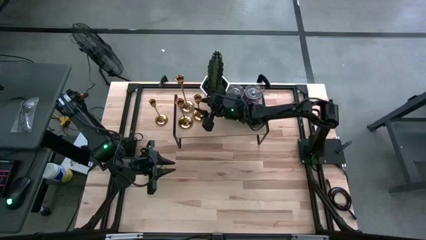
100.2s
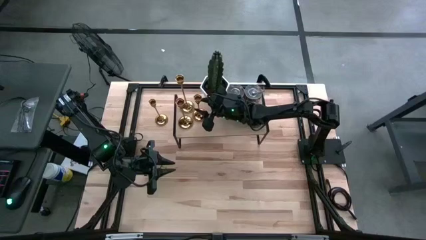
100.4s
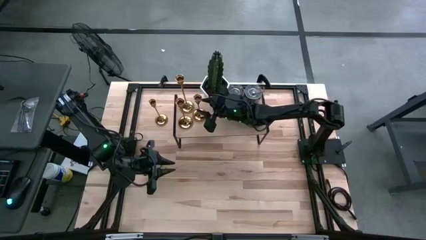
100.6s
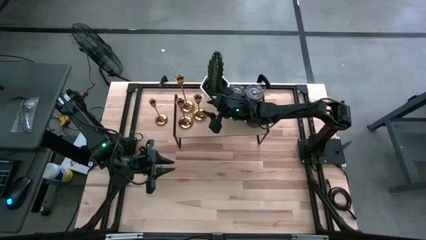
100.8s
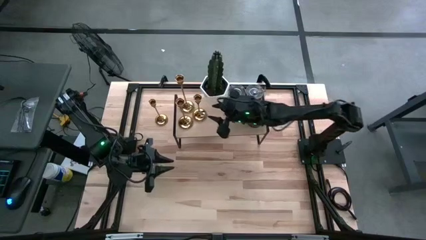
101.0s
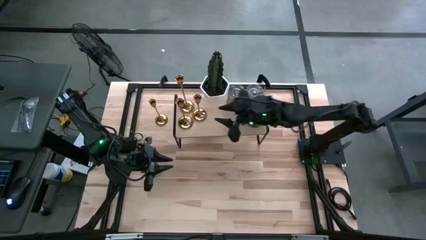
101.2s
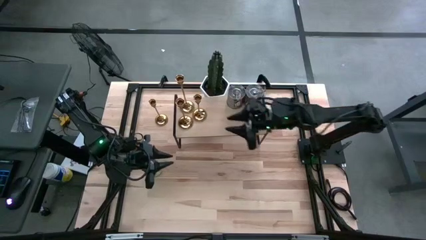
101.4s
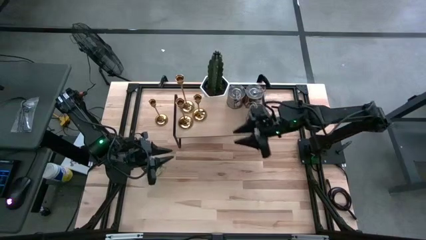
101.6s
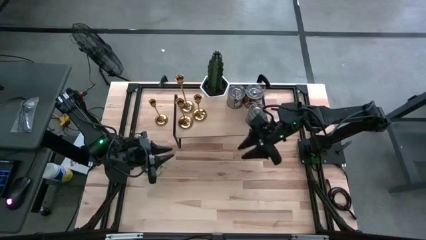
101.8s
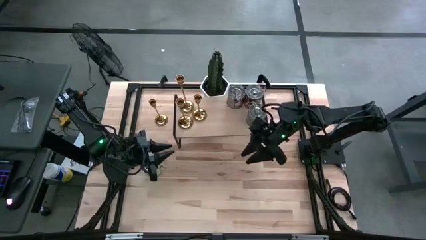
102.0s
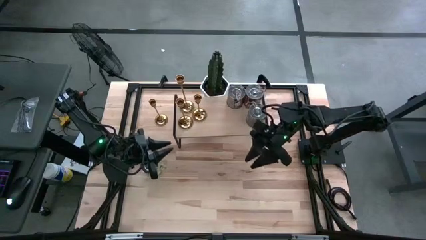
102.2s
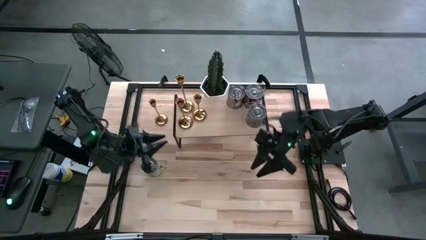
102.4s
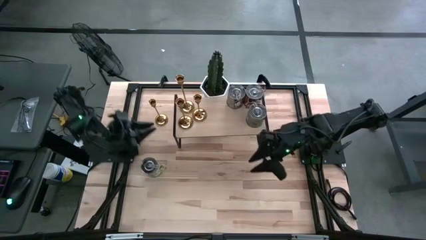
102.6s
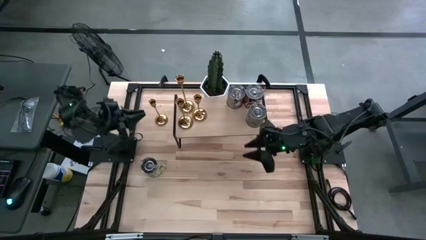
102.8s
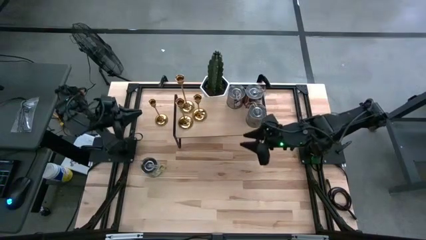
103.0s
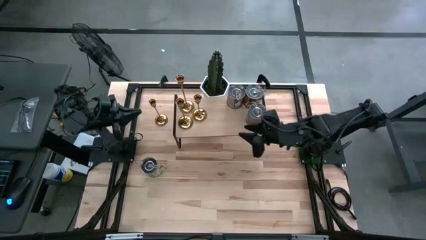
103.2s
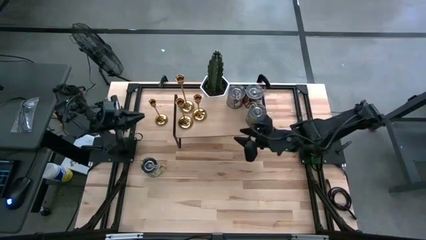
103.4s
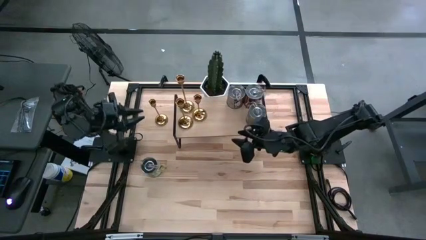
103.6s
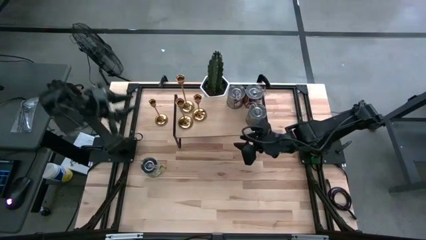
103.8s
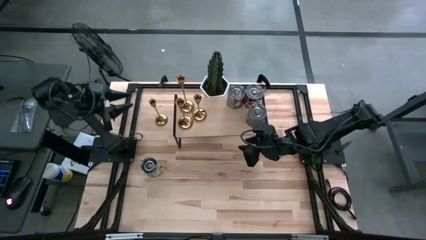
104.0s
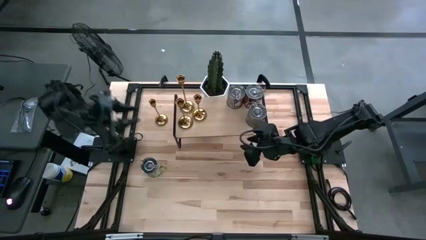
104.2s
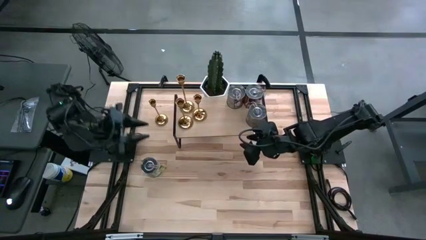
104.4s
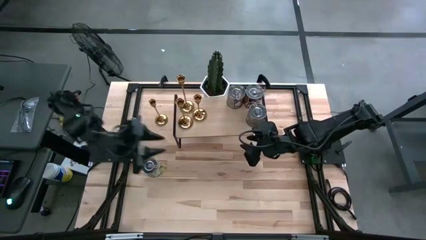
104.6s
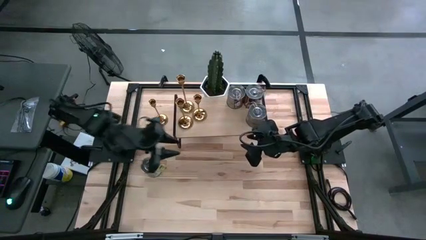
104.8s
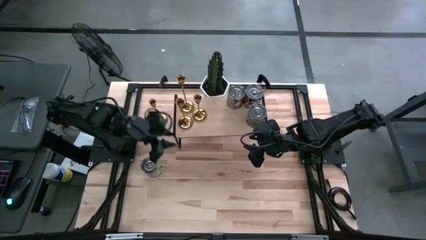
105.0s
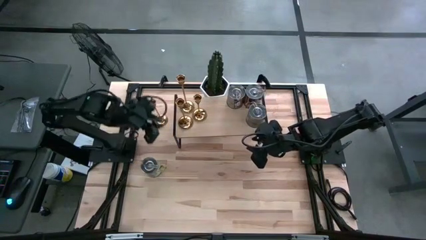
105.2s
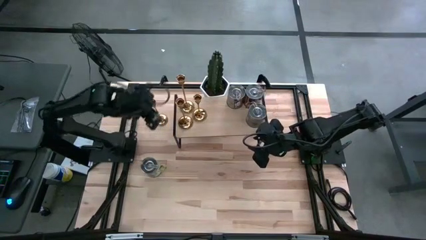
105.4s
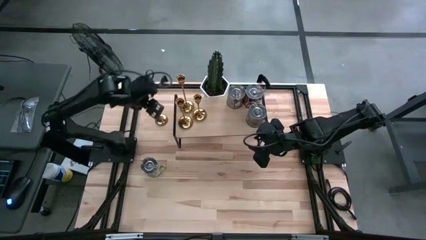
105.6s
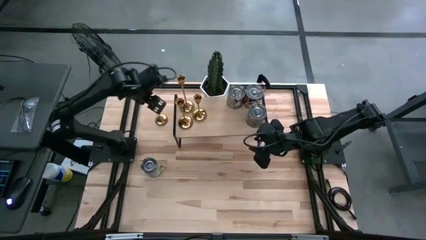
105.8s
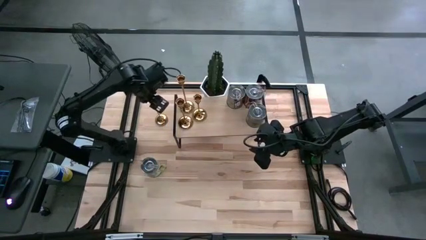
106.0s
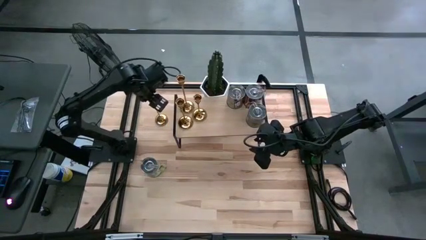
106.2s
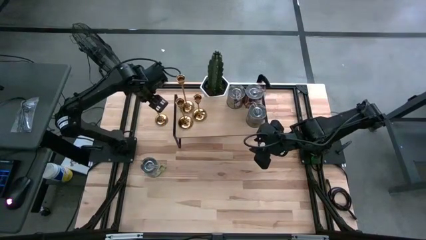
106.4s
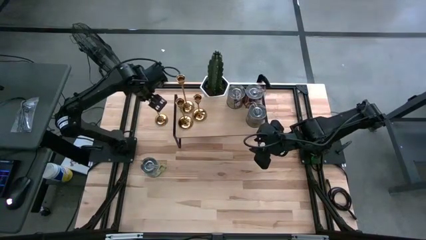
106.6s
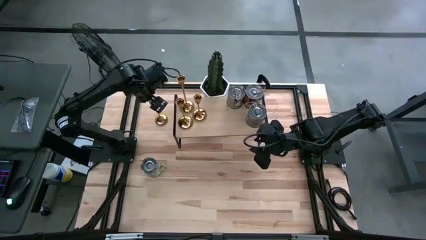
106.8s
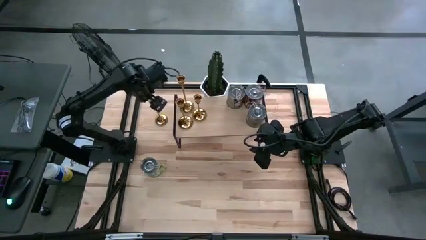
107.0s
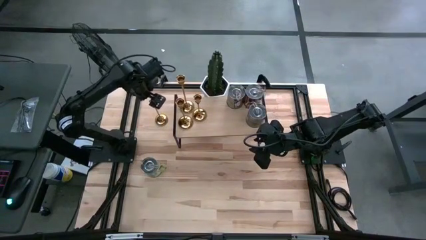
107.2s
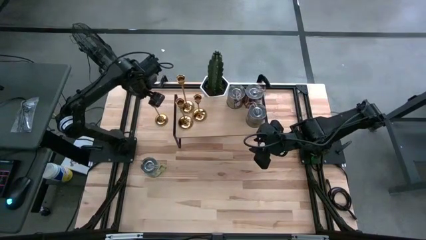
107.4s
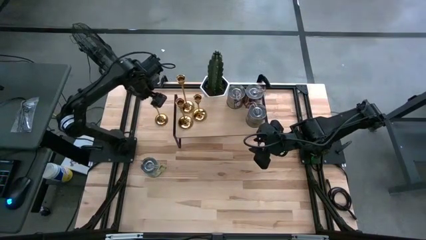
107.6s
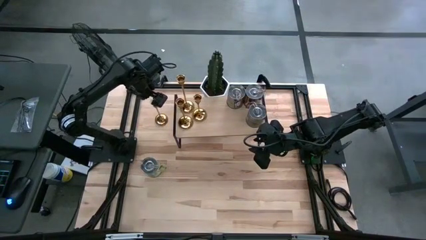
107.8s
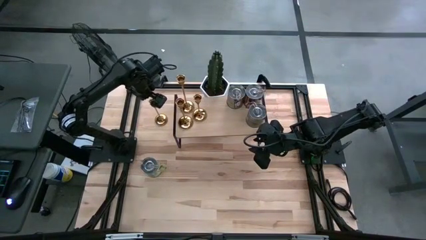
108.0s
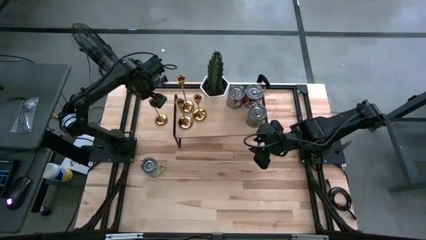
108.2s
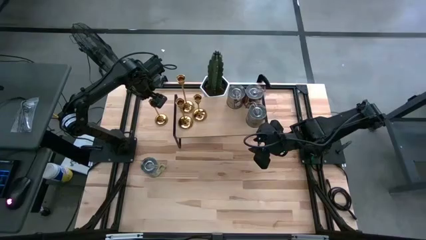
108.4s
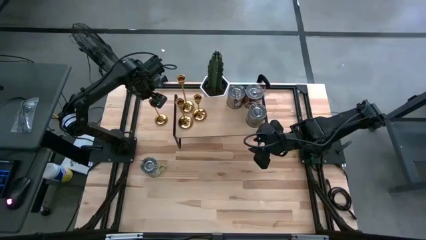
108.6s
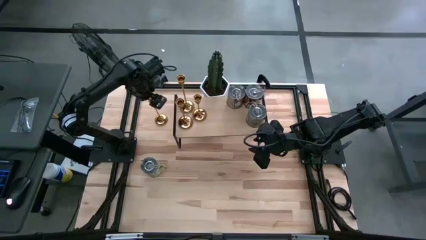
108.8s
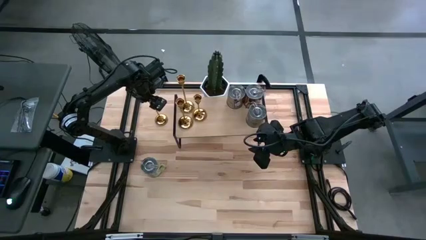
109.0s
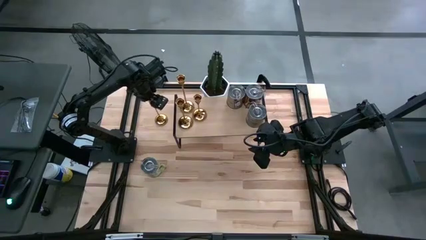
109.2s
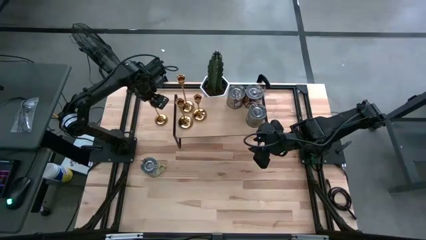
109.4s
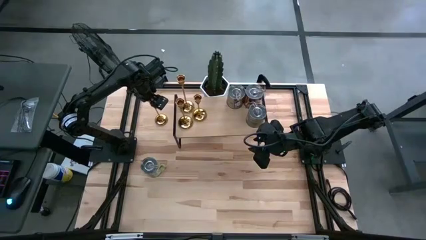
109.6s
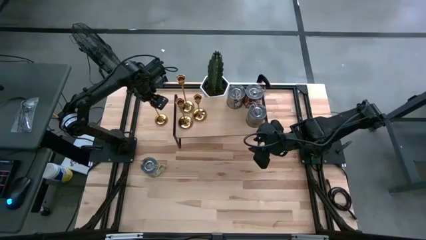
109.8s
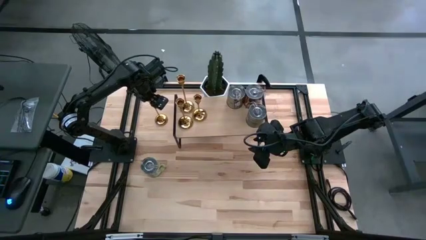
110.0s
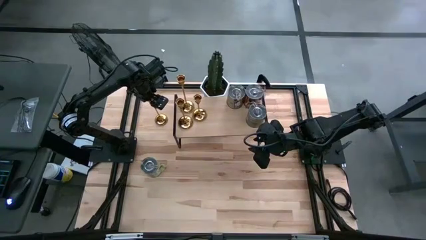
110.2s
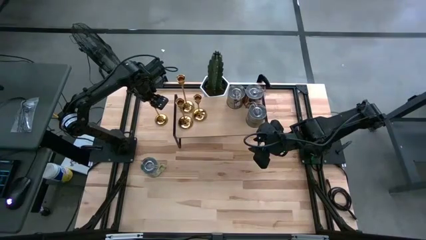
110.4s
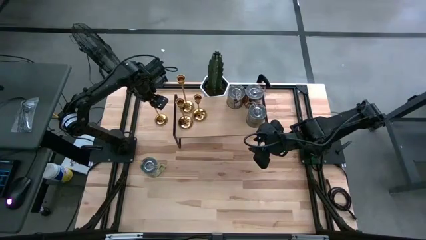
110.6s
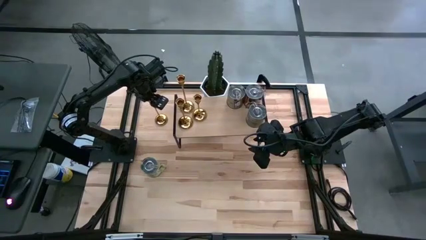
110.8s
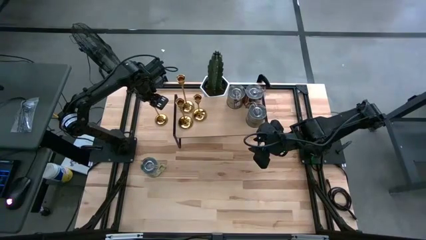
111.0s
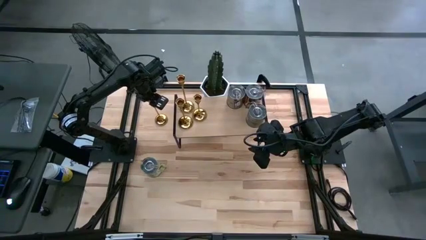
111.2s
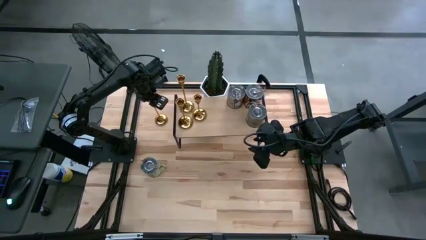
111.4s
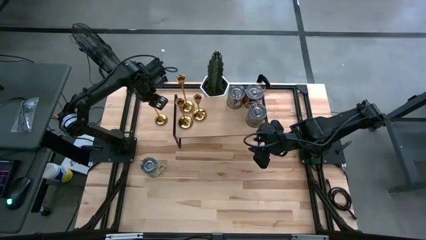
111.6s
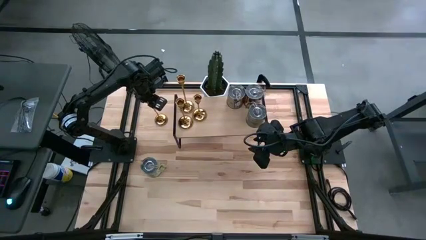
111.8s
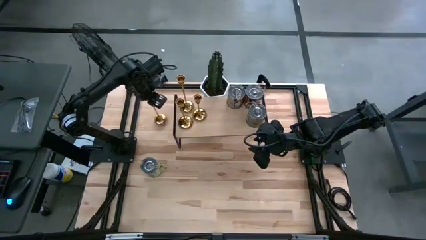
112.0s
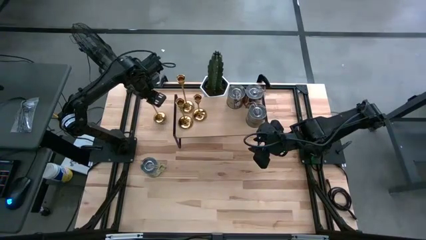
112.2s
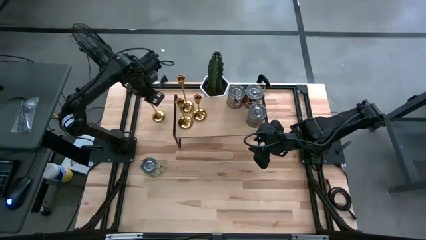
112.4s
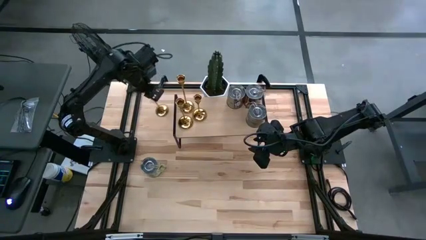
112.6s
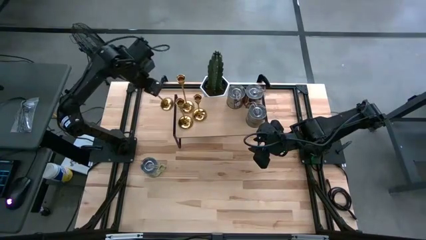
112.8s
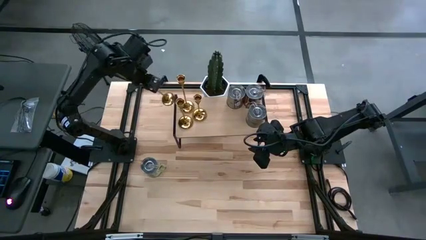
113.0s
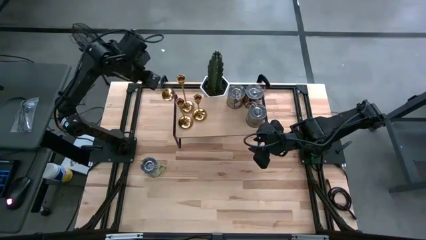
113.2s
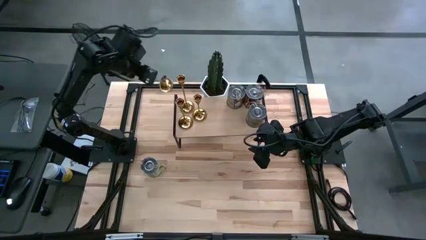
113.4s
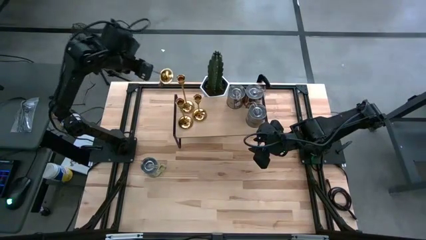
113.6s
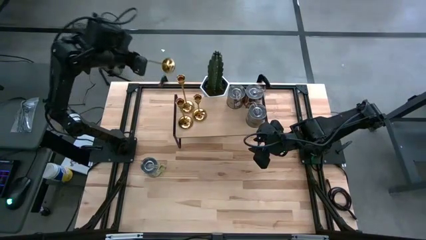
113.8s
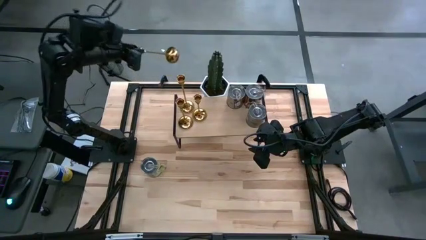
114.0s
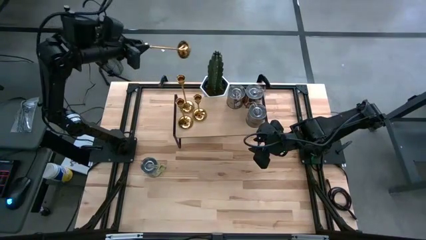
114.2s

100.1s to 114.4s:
Task: Pick & Place candle stick holders
Put the gold candle holder on the shelf
